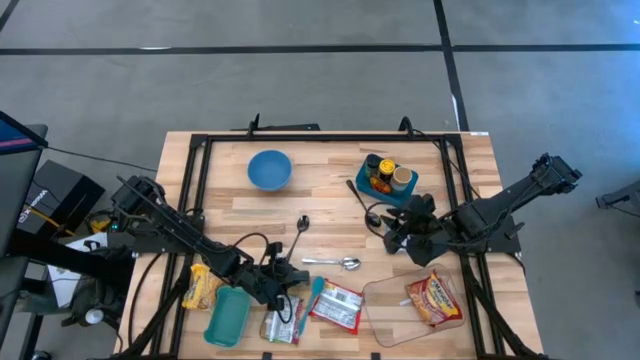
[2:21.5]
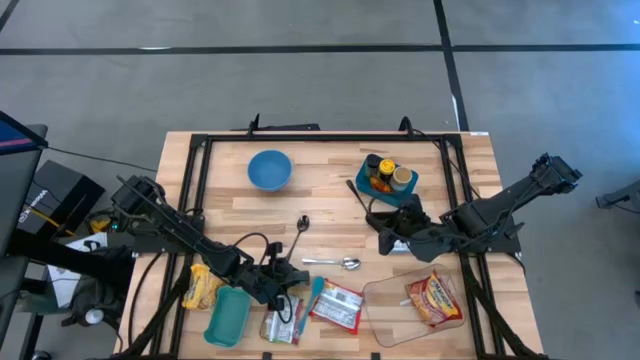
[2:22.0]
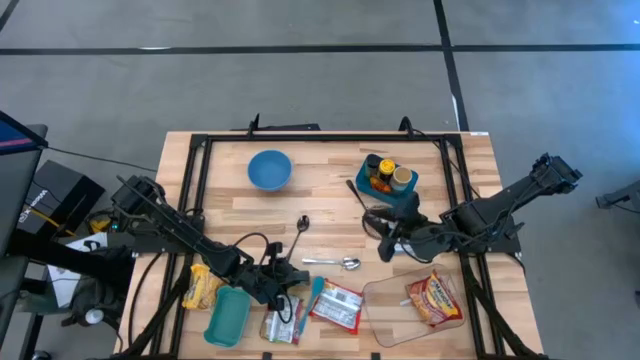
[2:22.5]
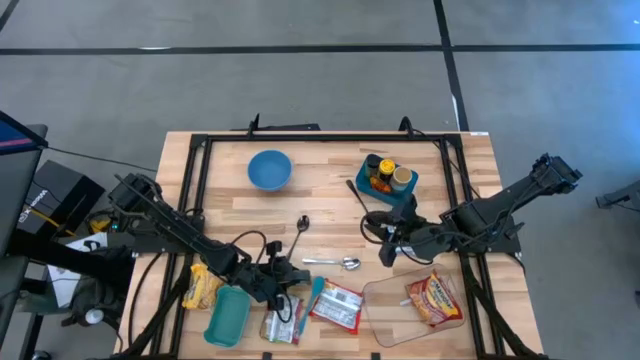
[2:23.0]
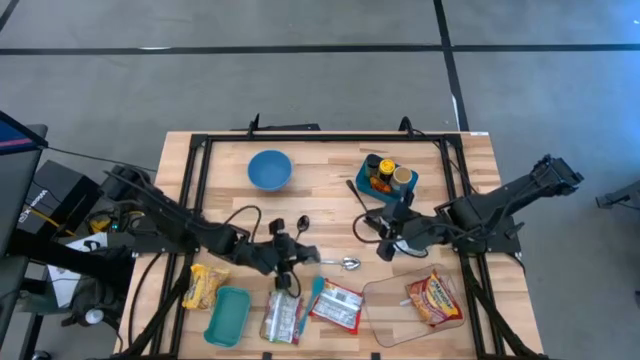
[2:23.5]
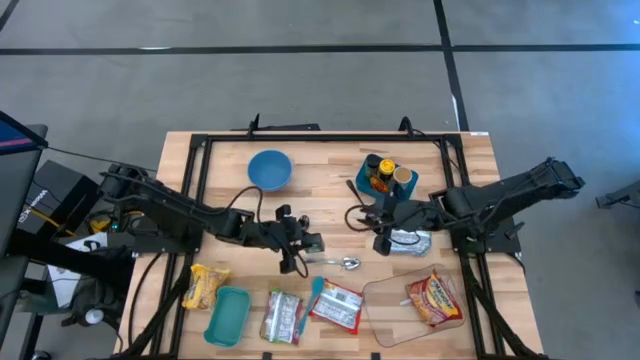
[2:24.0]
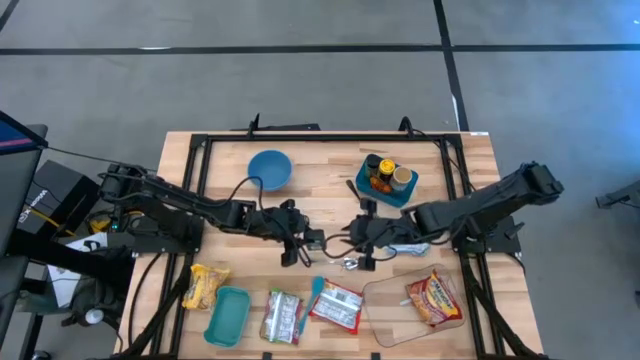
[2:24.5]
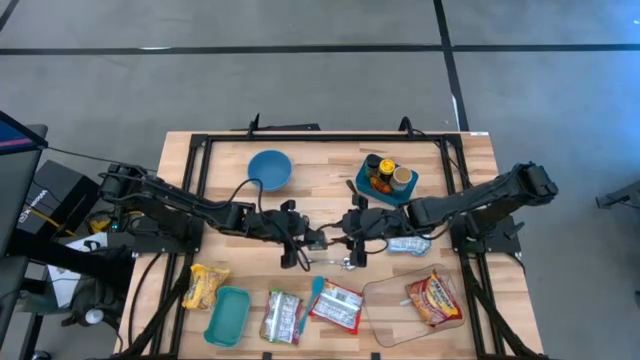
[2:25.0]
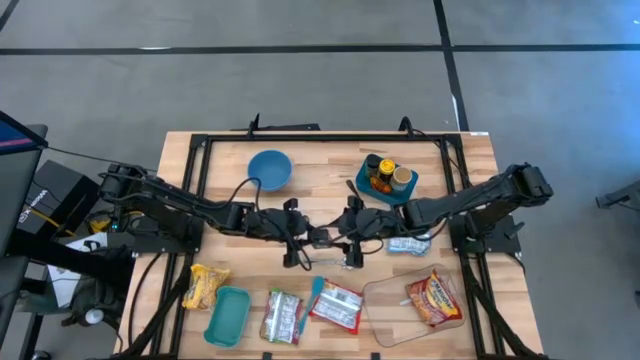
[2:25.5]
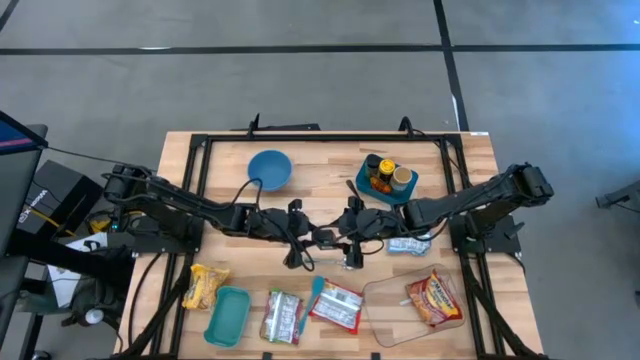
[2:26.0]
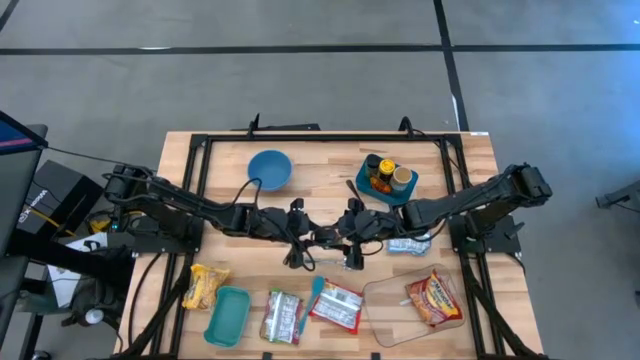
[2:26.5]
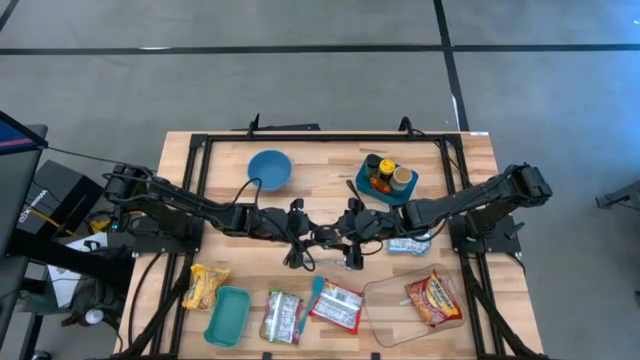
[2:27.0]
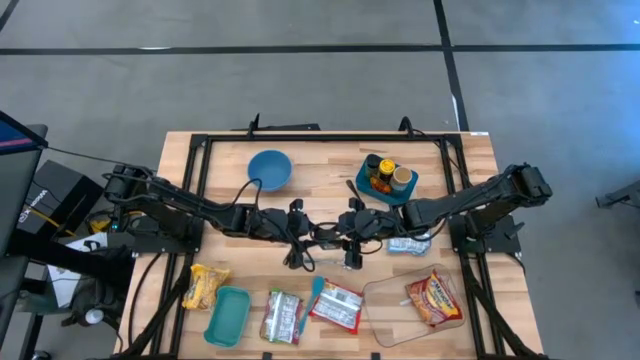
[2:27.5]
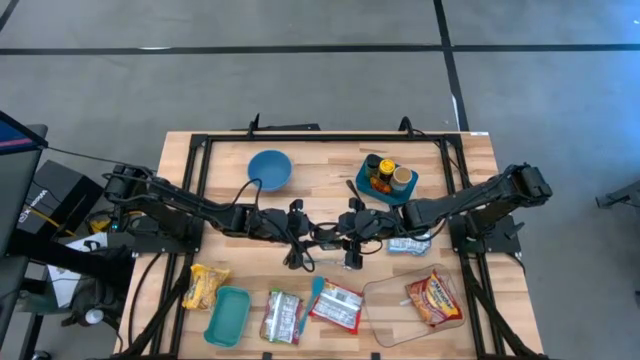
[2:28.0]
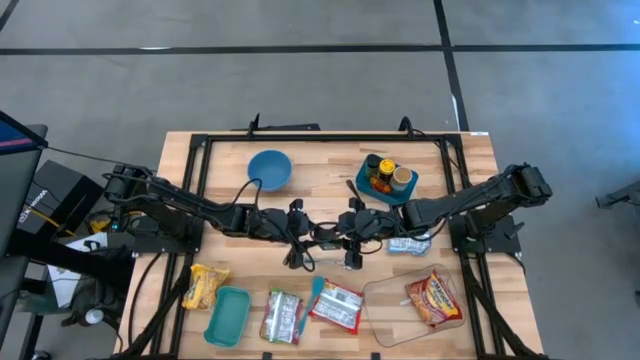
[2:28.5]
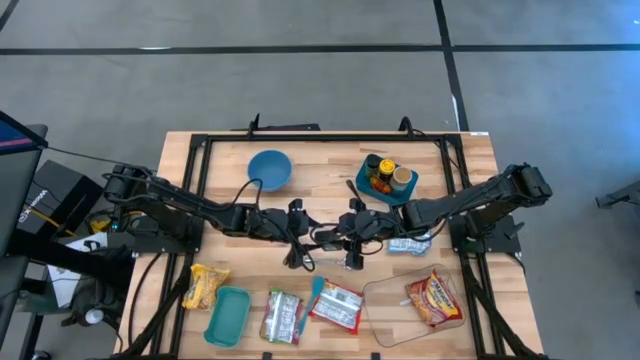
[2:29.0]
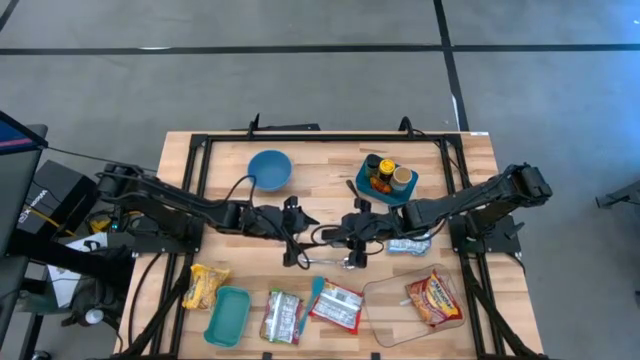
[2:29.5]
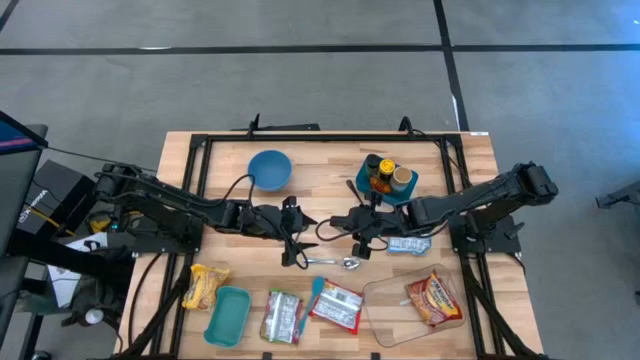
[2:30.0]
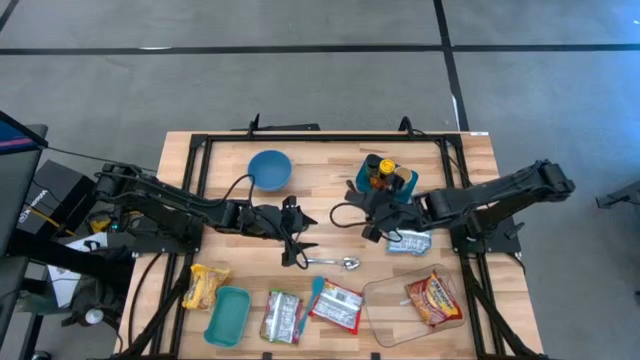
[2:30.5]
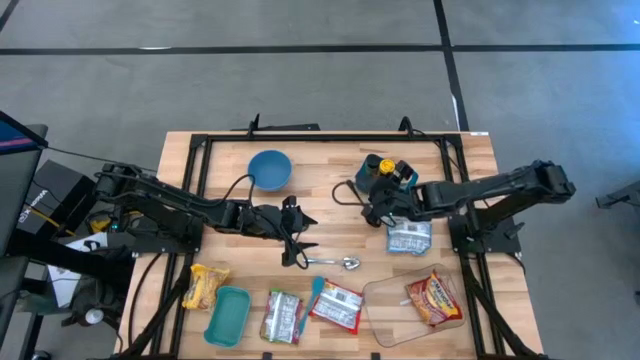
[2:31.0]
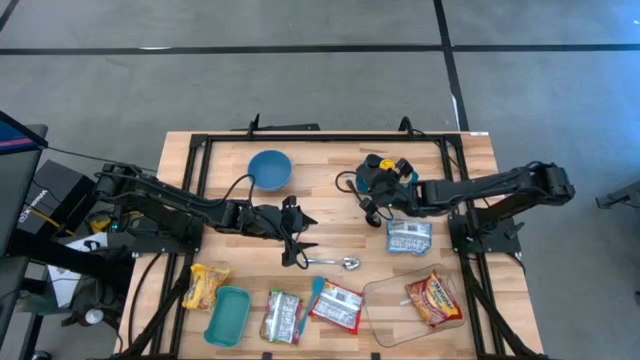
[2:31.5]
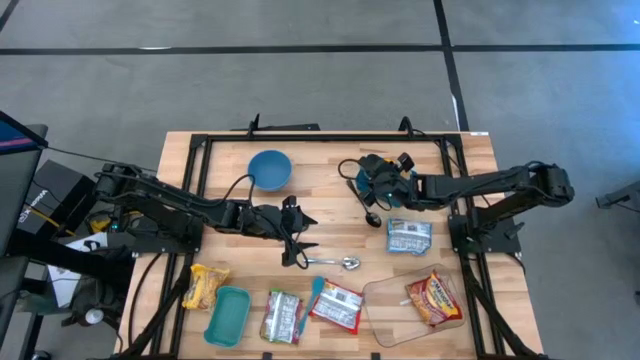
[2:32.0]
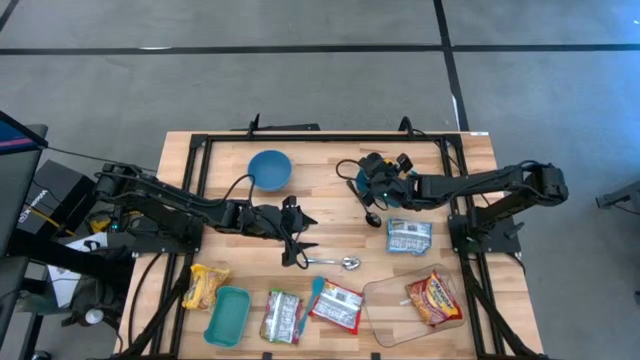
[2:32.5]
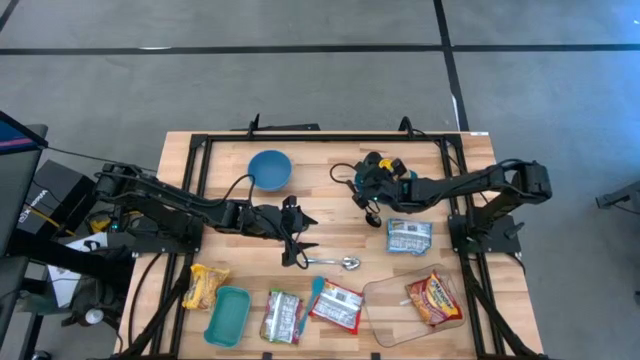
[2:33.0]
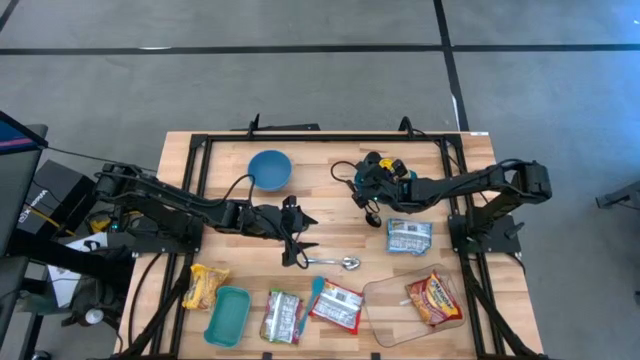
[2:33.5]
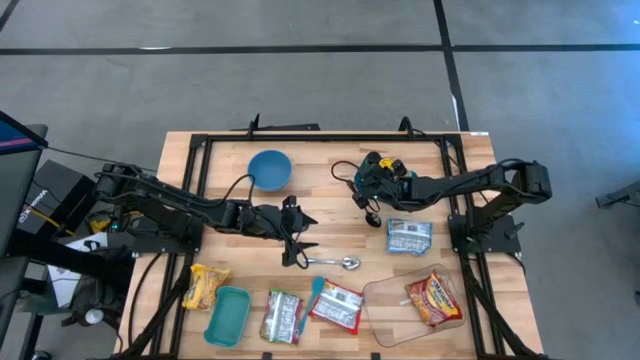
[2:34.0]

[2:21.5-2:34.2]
Task: Pick & Place Food Item
Put the black seasoning can into the blue bin

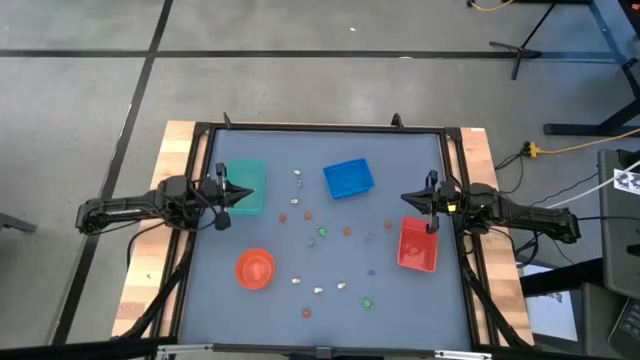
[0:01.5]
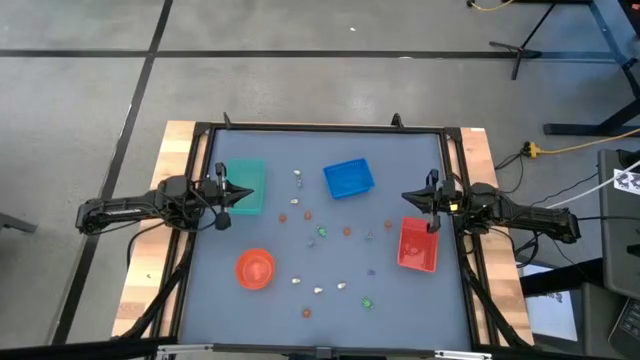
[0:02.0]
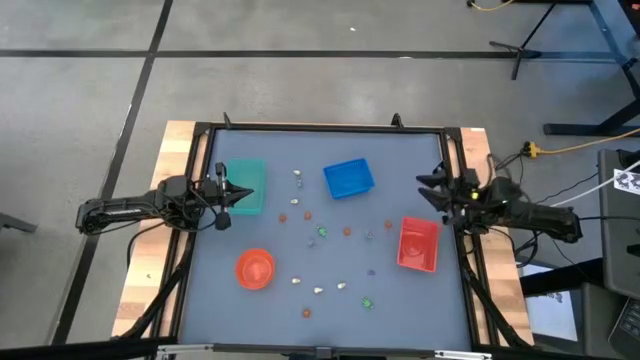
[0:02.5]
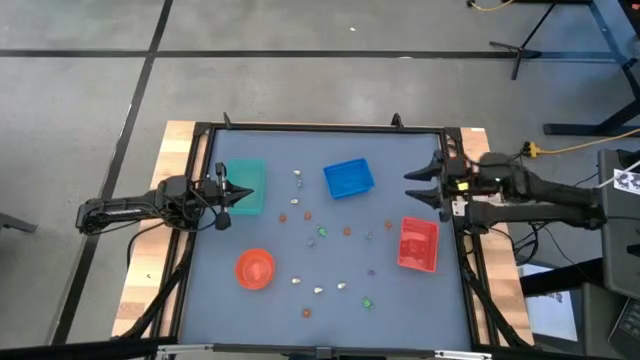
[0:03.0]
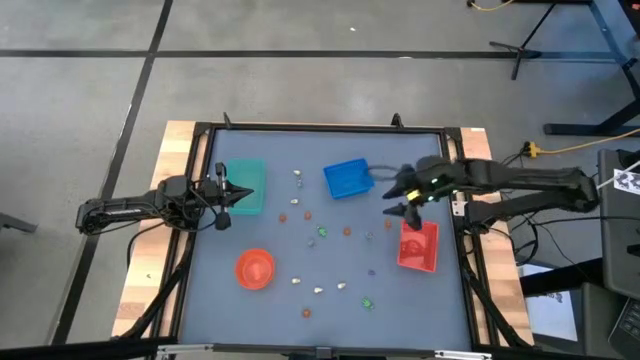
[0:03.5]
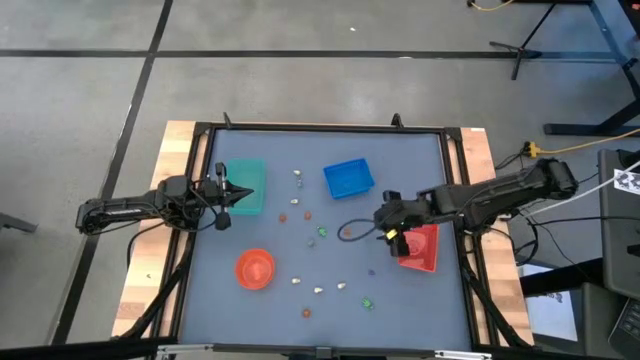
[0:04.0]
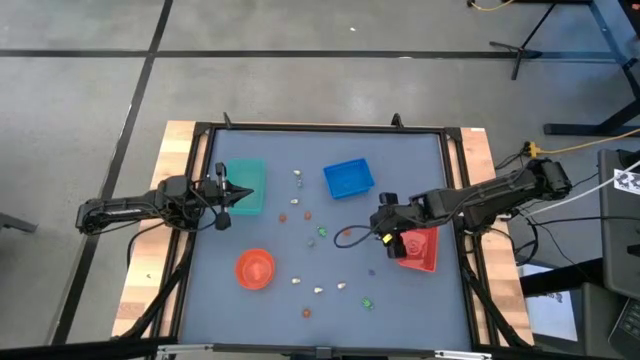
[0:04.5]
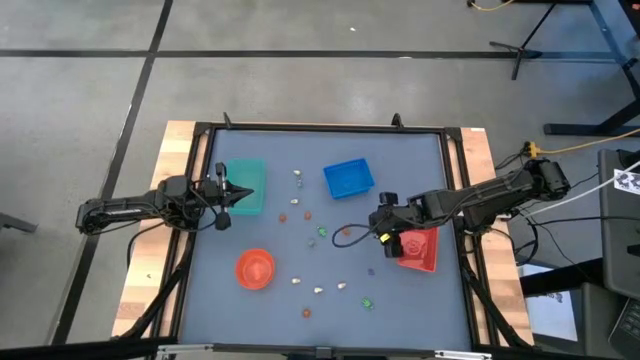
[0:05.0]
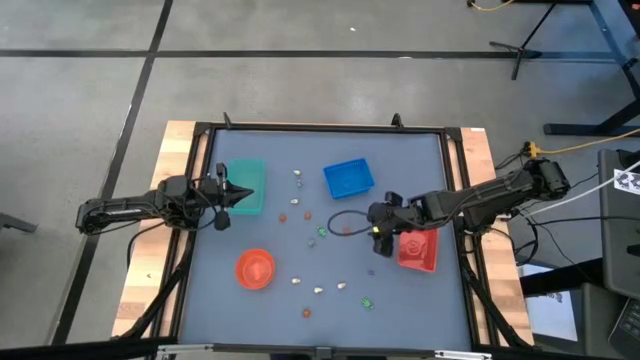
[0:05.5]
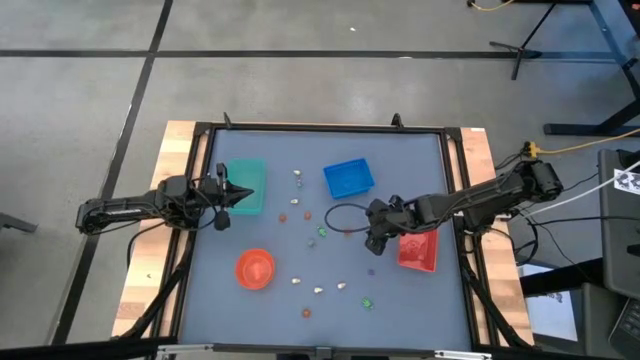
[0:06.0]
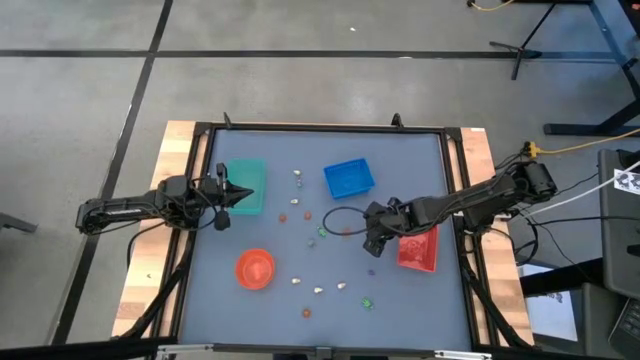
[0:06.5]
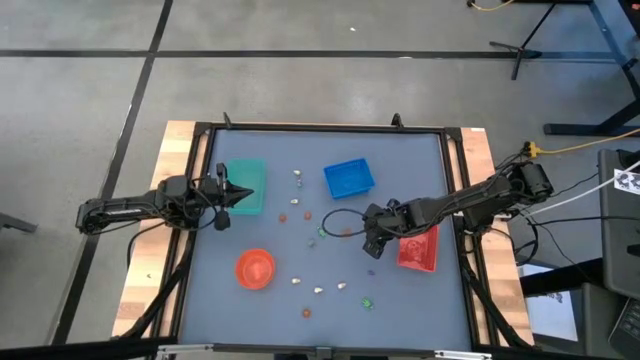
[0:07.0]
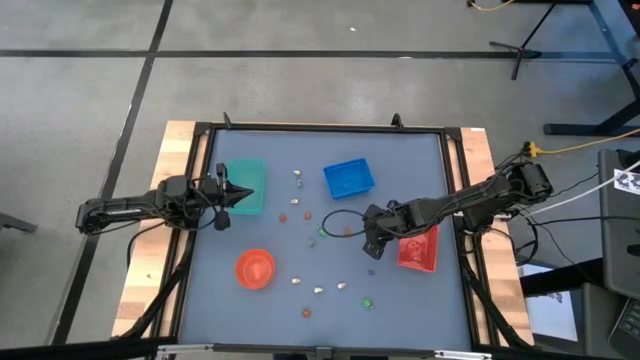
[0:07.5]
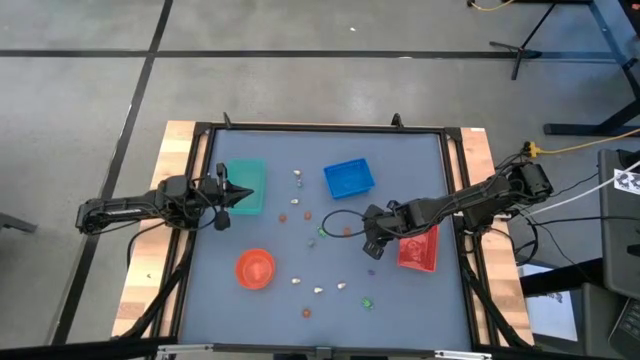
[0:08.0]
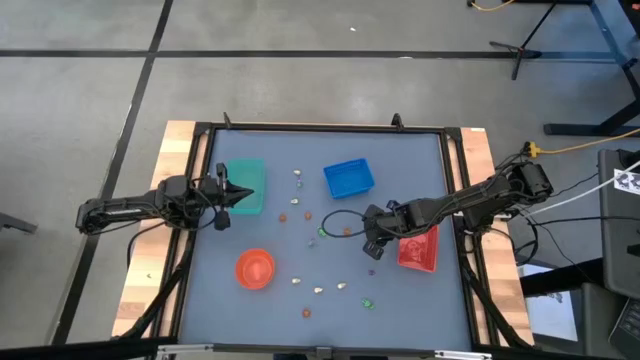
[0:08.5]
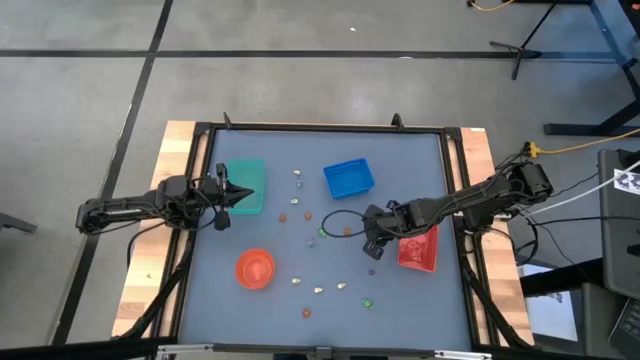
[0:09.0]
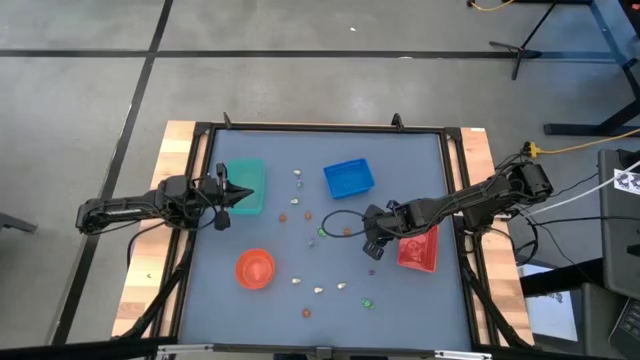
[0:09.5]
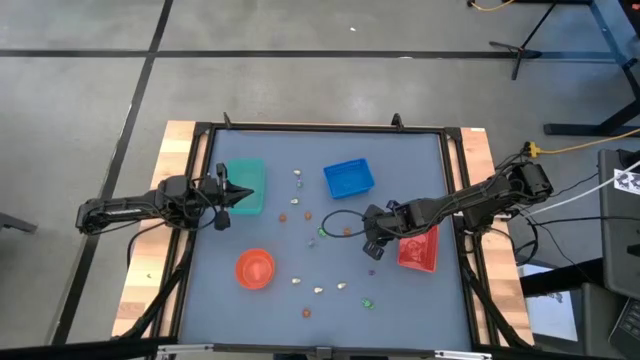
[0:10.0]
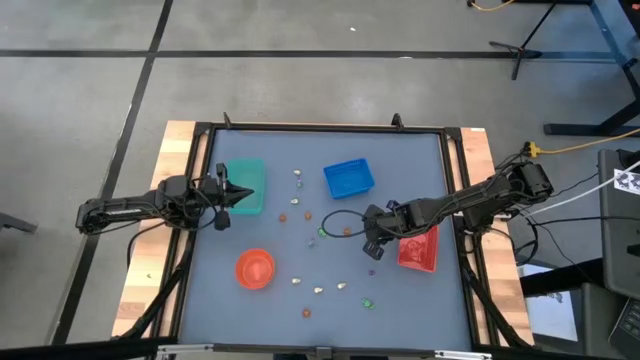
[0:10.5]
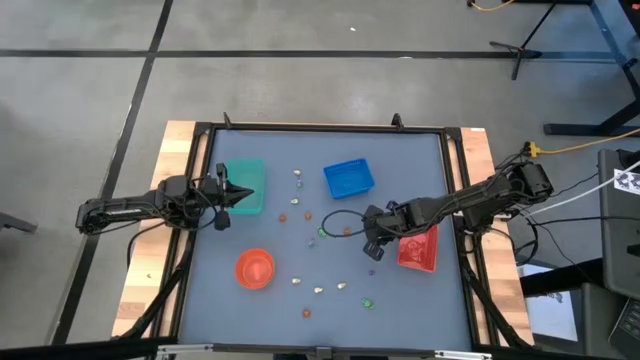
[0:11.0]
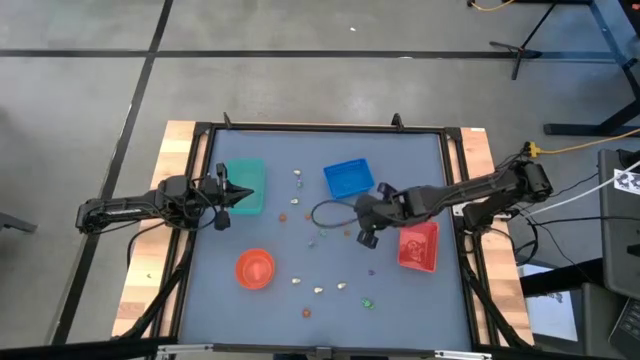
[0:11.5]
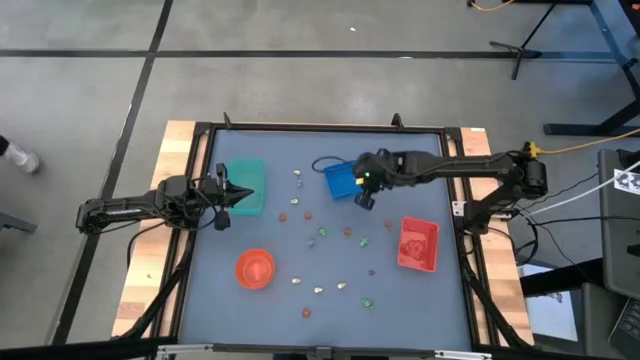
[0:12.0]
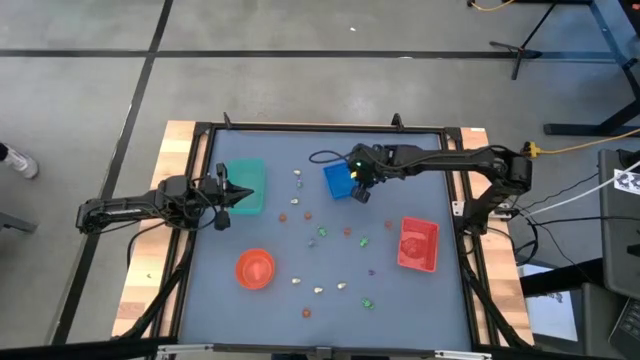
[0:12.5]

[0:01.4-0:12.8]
Task: Sort Halloween decoration
Put the purple hat toy into the blue bin
